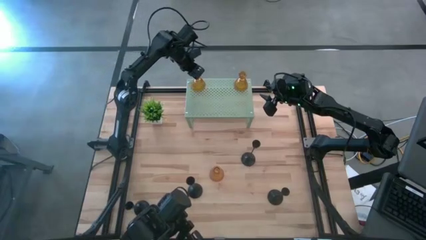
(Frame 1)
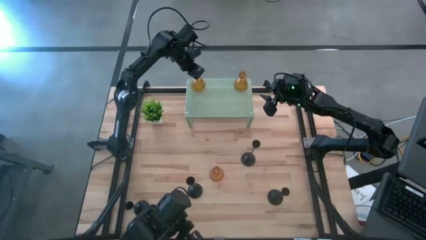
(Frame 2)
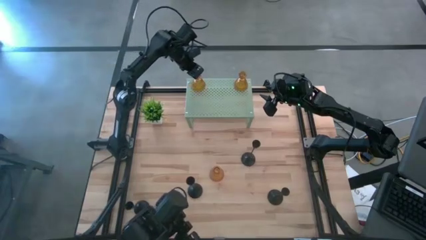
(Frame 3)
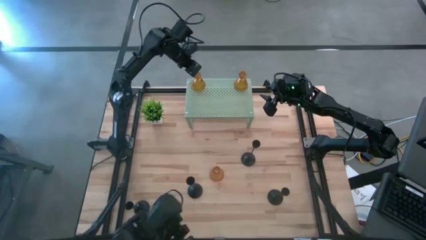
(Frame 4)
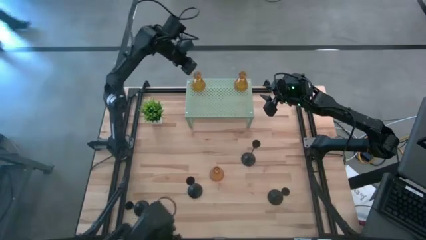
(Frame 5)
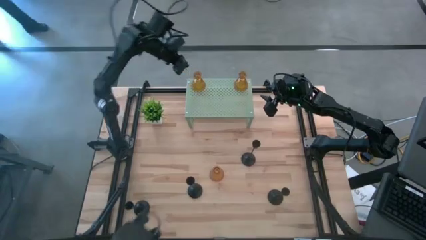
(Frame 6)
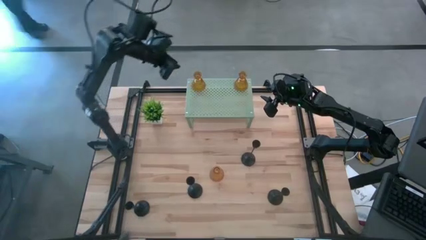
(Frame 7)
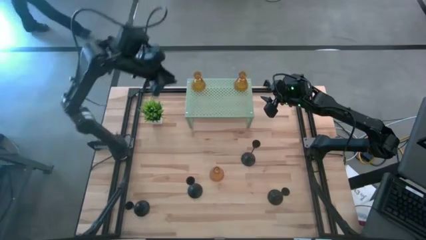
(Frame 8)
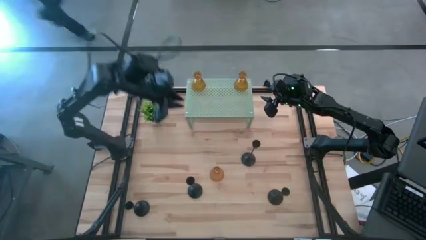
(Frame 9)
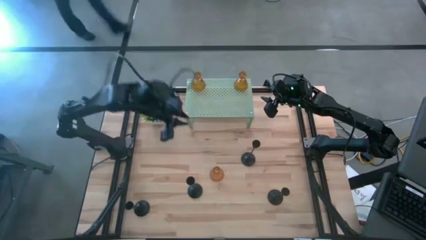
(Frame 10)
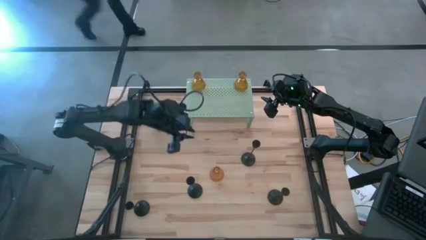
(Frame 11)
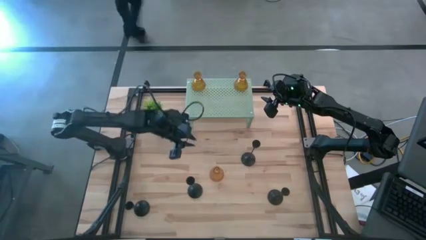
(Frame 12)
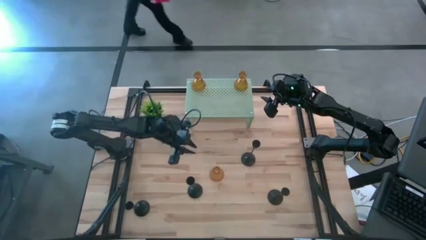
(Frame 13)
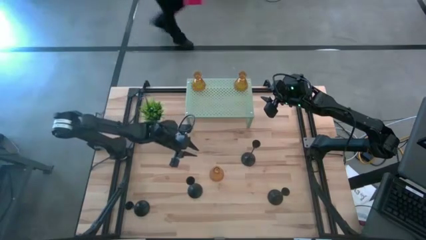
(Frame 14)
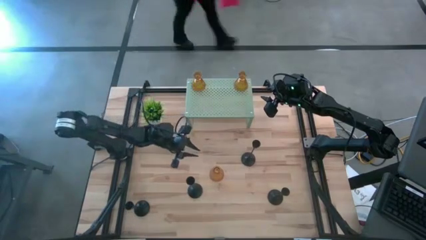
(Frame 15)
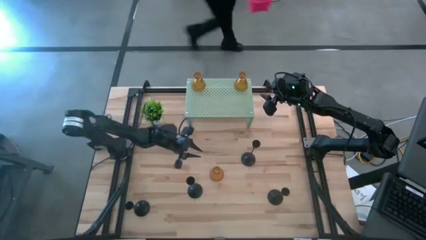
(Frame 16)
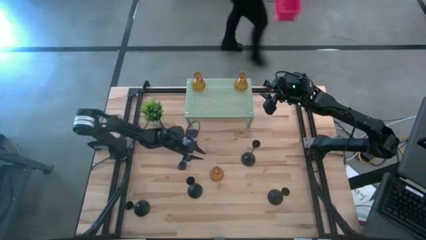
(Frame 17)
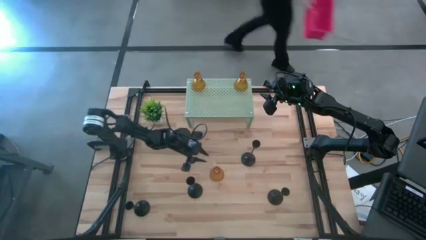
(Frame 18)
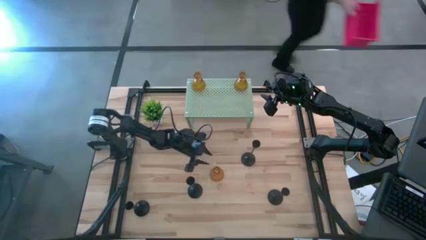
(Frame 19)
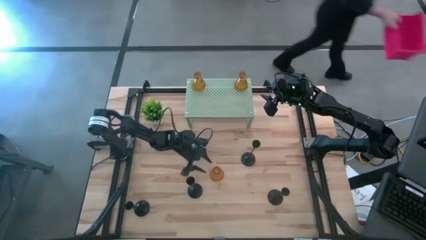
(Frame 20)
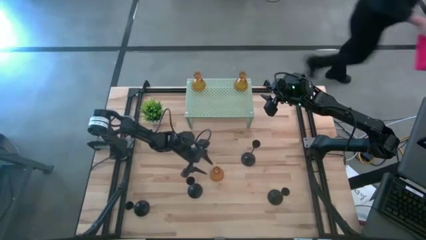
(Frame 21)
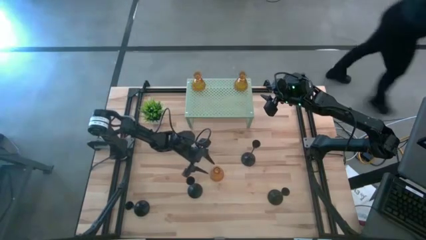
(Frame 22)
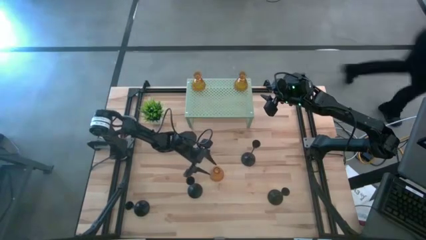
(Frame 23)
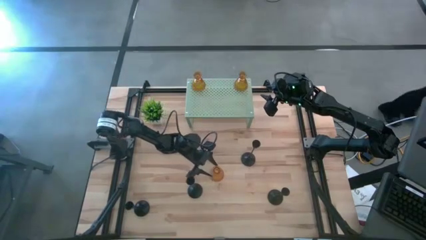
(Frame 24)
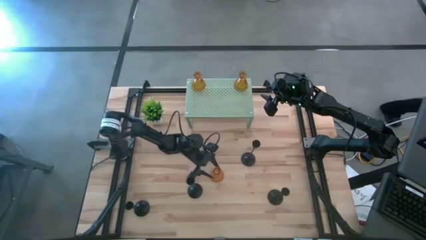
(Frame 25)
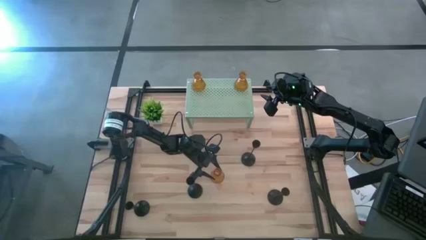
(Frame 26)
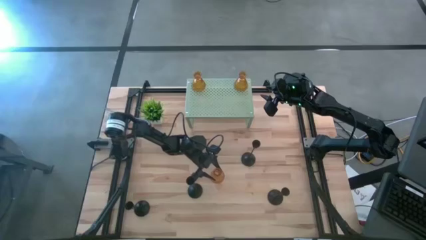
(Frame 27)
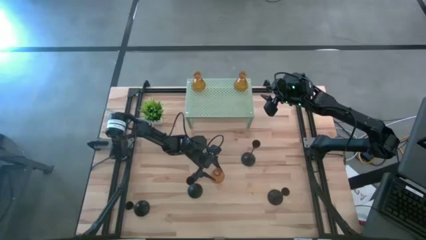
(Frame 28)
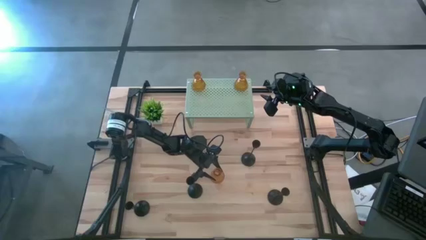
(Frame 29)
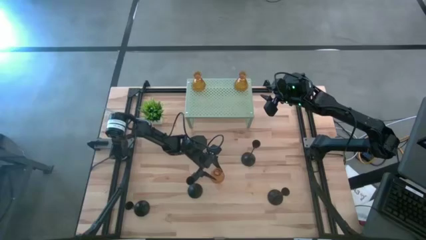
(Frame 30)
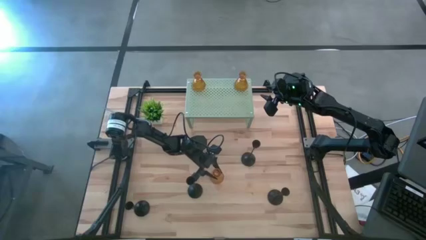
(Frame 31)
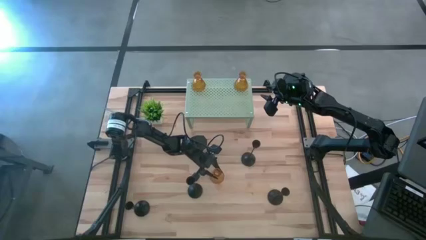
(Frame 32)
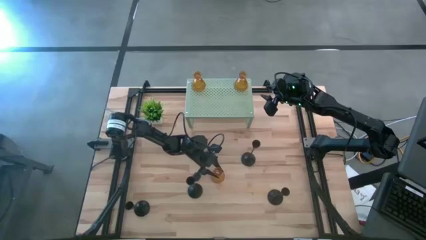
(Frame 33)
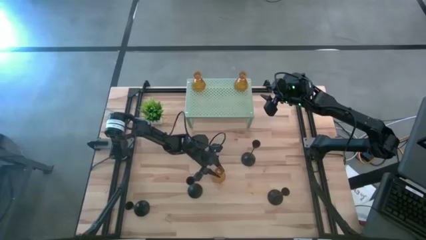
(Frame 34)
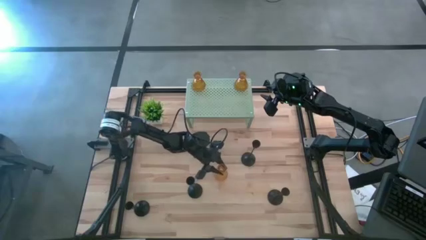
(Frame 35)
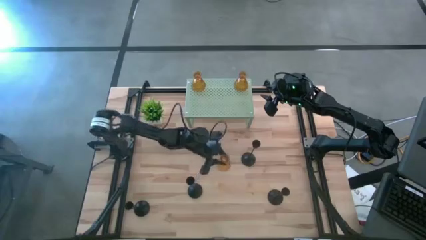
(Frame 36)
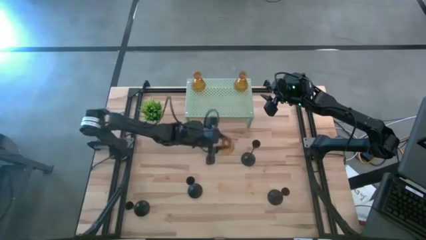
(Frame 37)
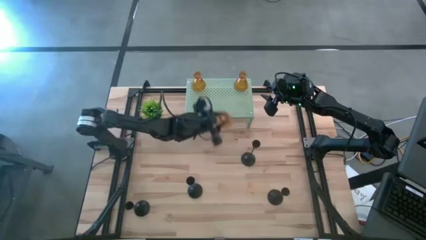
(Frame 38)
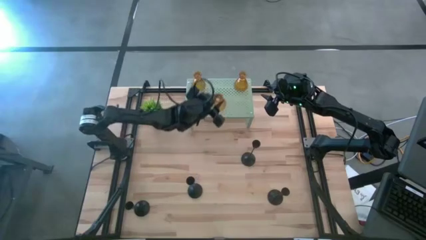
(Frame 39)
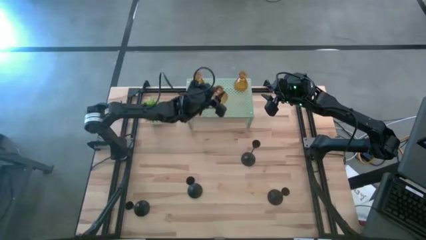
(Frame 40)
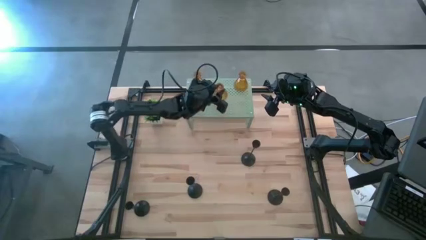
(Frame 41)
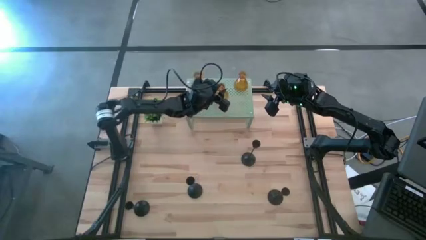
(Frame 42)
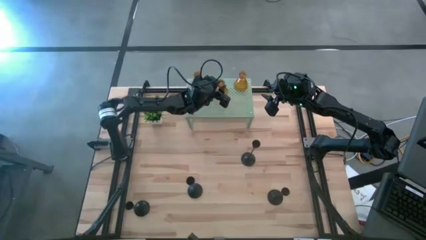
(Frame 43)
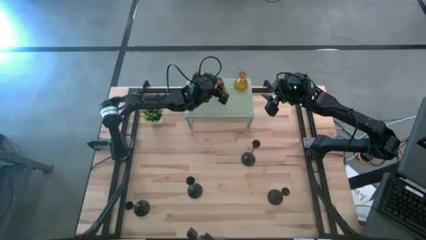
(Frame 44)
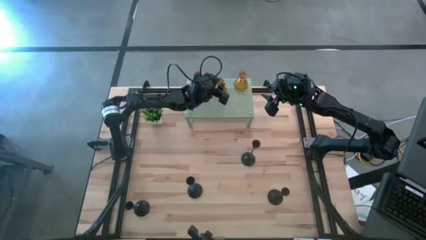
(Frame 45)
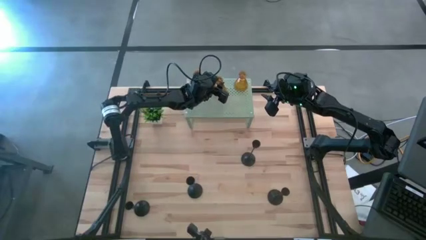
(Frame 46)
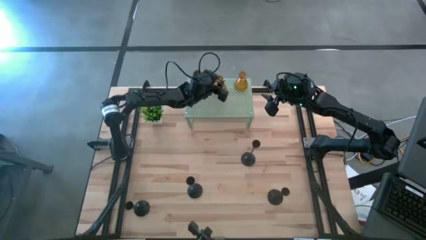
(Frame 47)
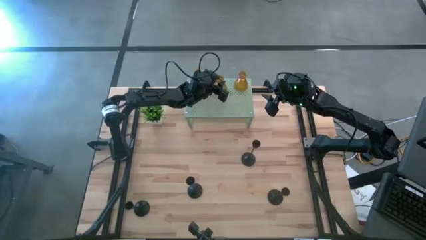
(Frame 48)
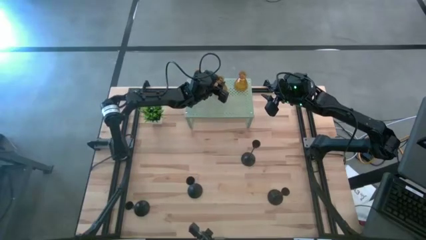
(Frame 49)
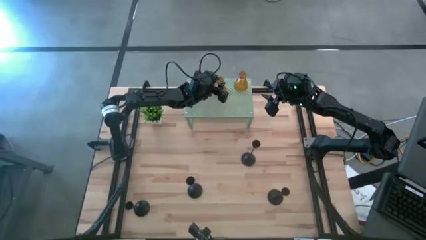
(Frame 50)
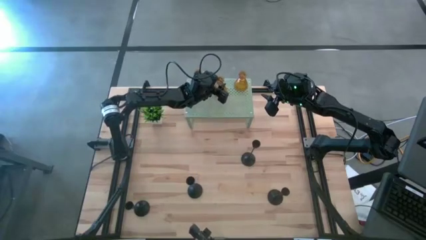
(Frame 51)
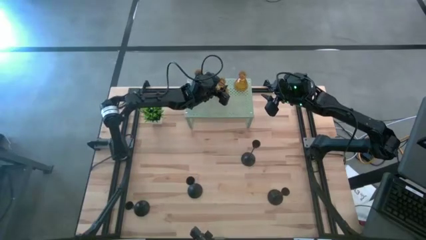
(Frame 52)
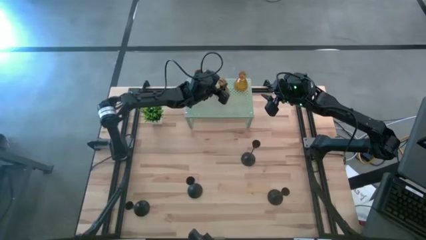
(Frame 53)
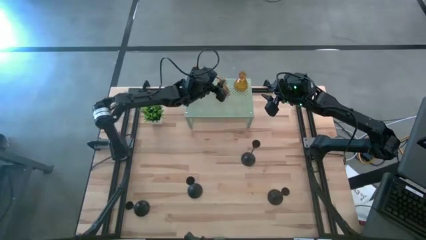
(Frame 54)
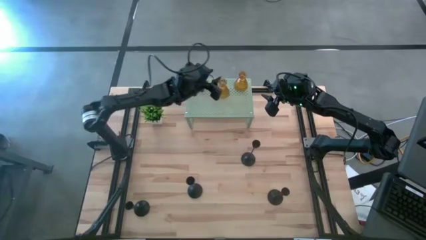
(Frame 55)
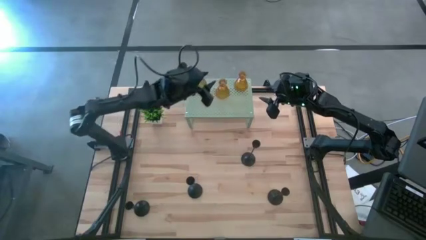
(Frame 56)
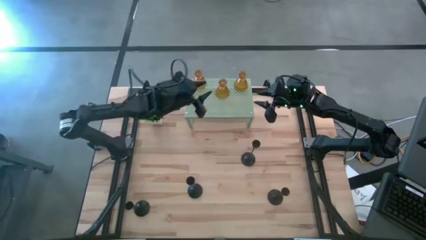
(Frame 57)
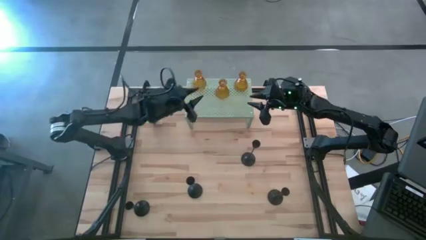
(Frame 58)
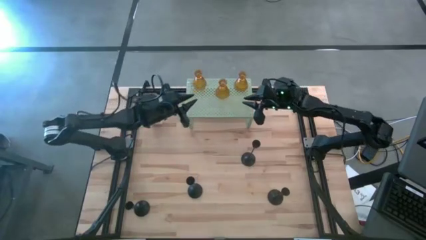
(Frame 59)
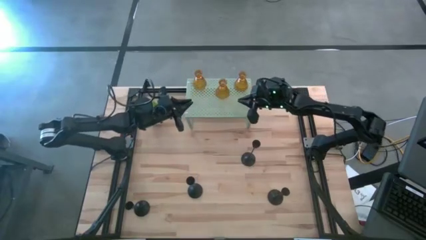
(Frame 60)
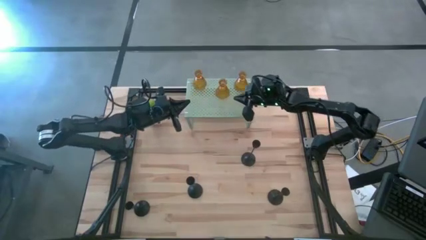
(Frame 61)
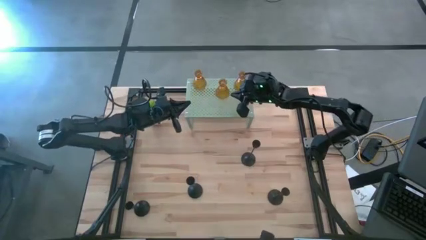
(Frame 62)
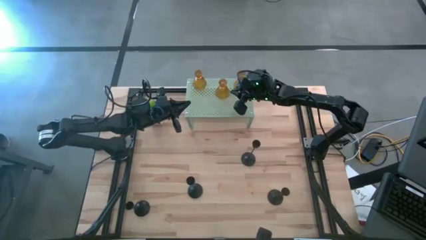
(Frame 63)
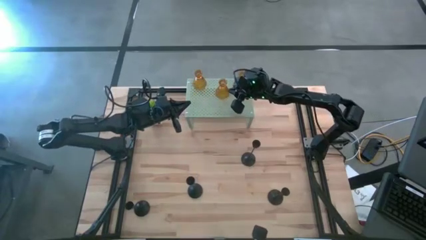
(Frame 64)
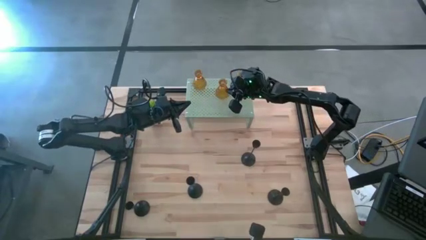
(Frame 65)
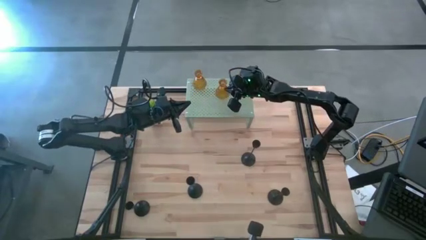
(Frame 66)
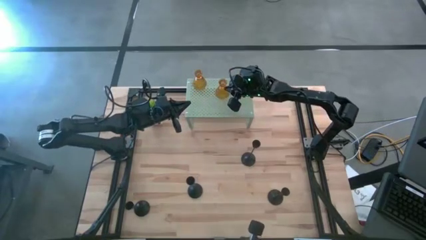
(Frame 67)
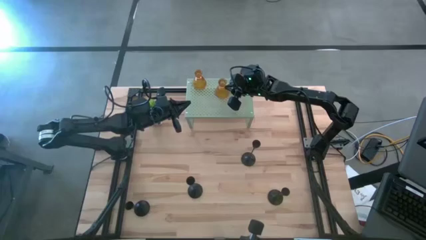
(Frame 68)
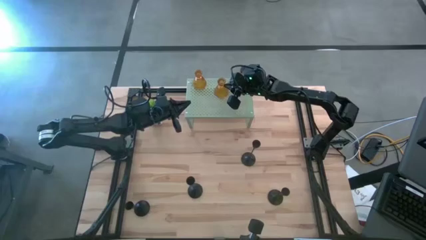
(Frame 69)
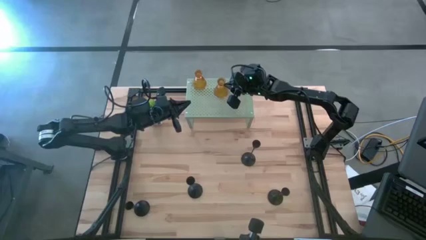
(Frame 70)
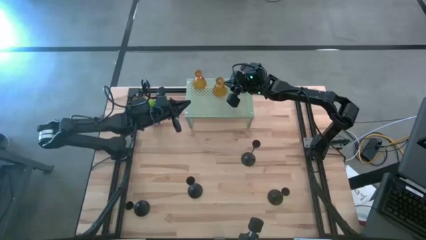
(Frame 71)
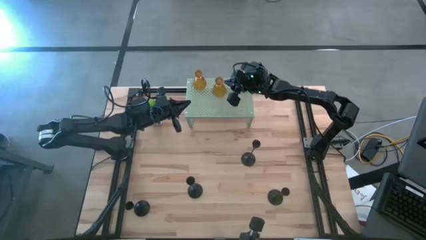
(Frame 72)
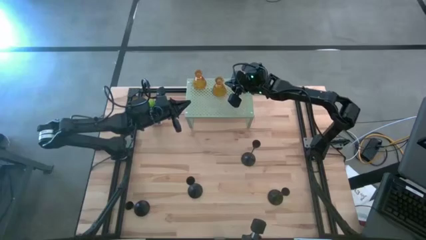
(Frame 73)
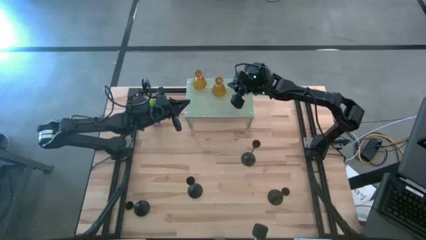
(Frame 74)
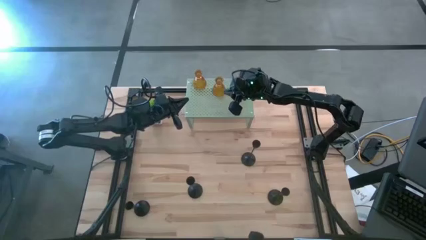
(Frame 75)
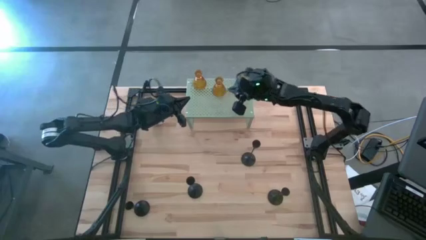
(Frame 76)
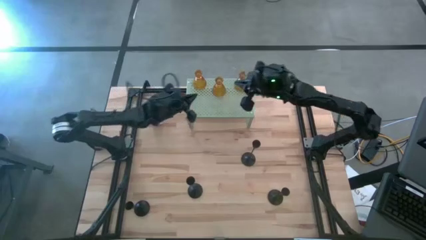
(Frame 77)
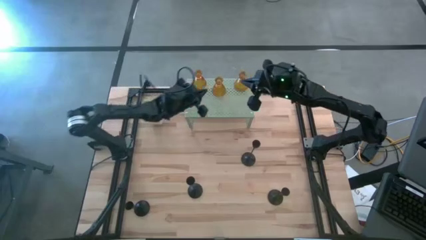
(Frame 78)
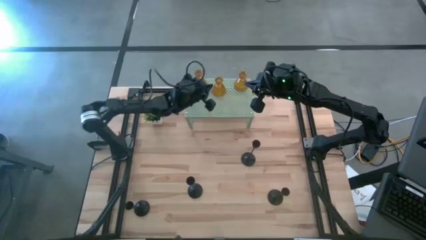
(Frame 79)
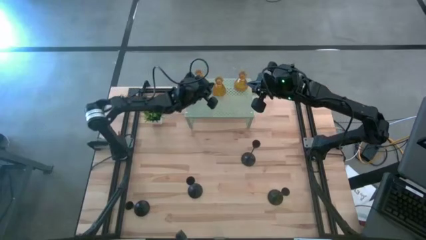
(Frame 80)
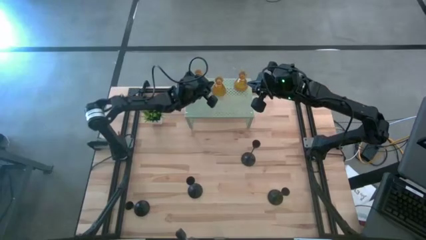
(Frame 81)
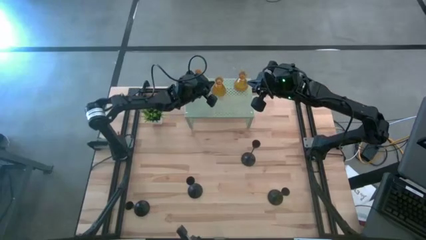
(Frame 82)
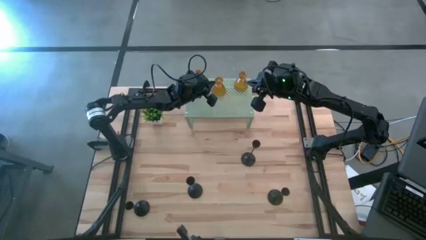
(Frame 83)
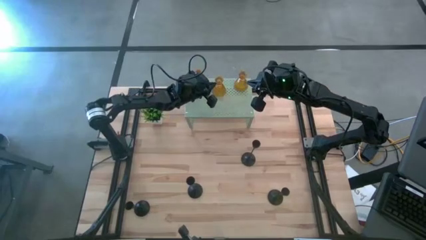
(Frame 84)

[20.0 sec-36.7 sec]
Task: Pick & Place candle stick holders
Put the yellow glass candle holder on the shelf
